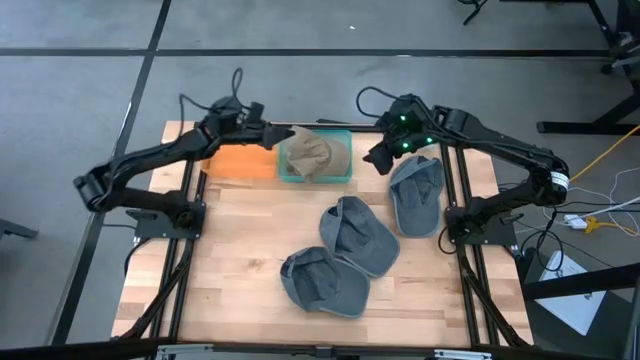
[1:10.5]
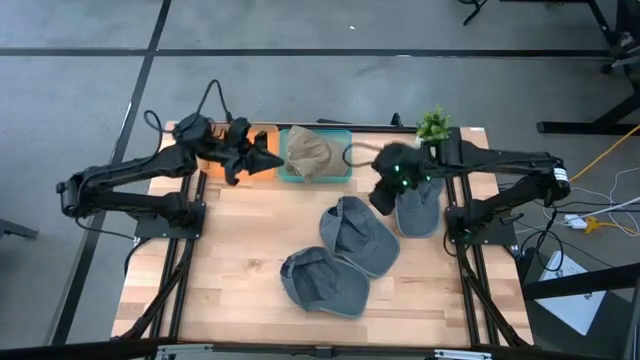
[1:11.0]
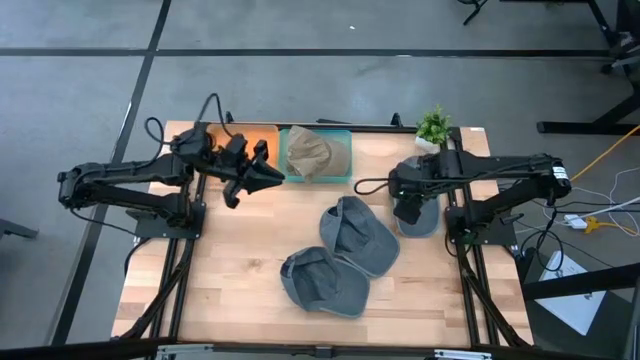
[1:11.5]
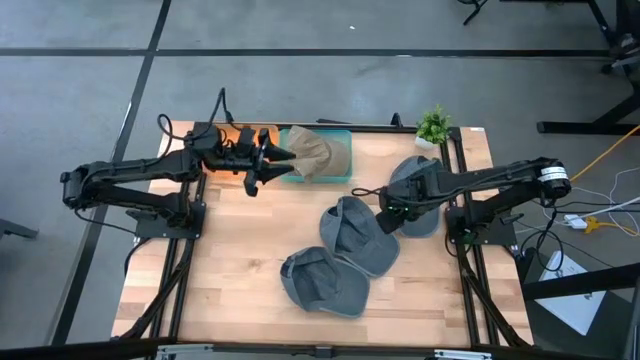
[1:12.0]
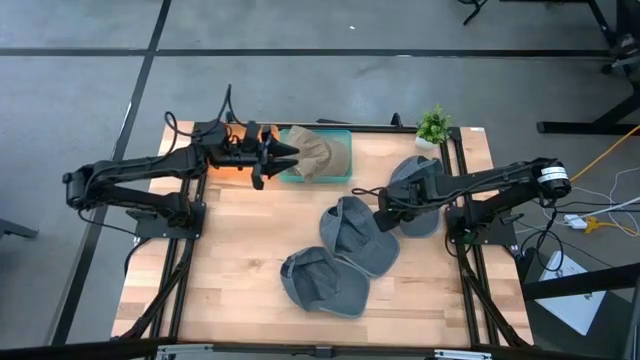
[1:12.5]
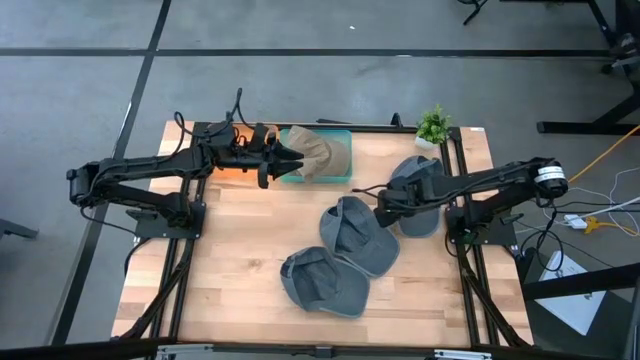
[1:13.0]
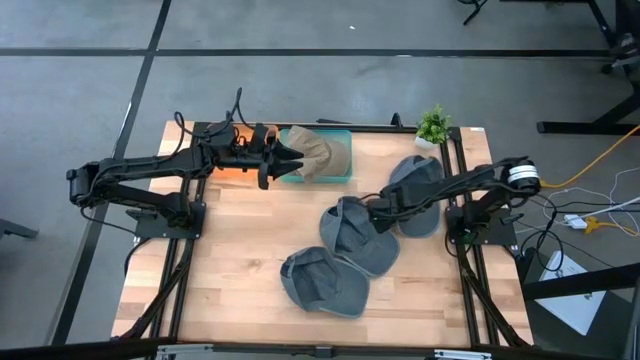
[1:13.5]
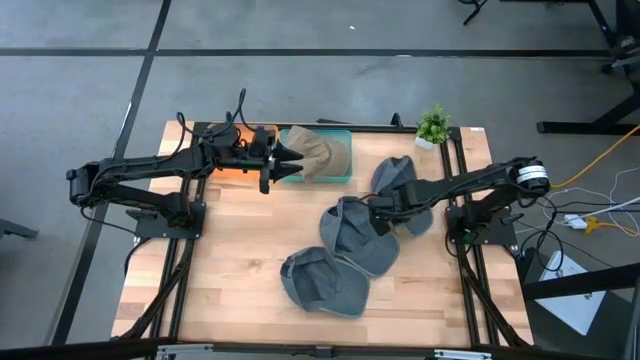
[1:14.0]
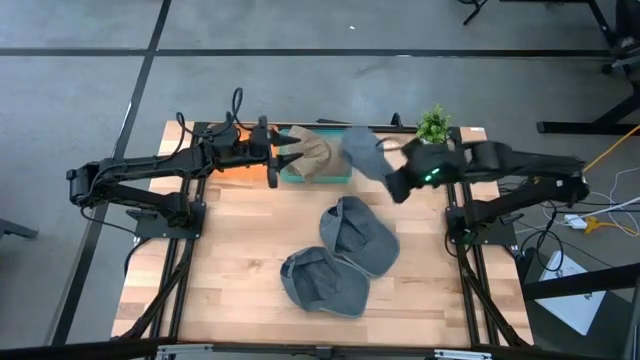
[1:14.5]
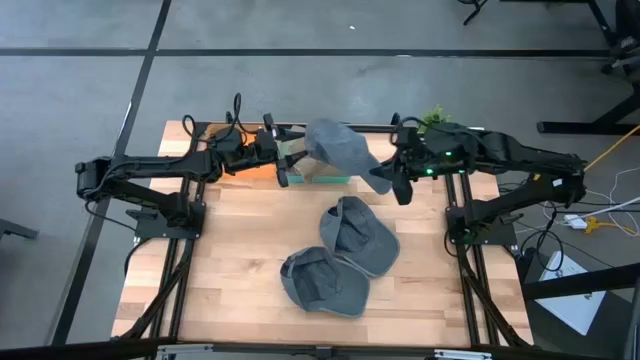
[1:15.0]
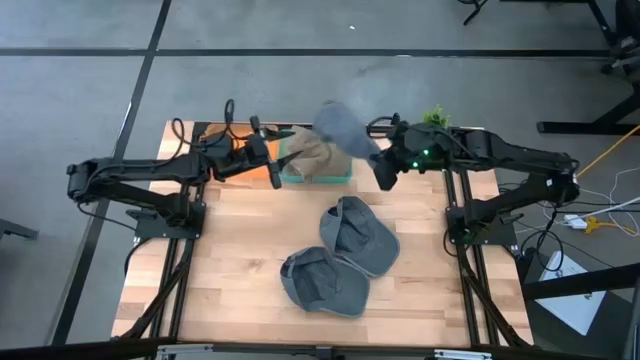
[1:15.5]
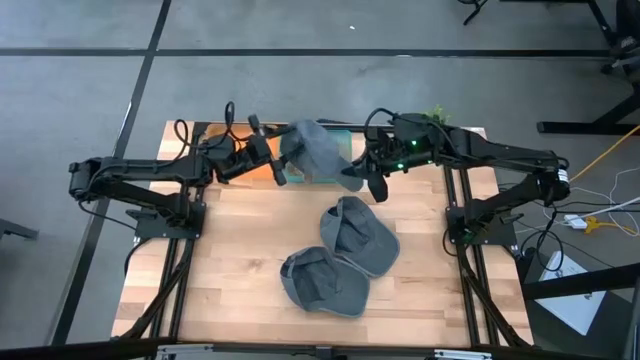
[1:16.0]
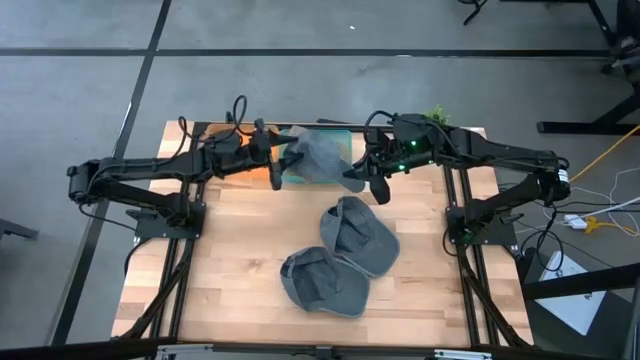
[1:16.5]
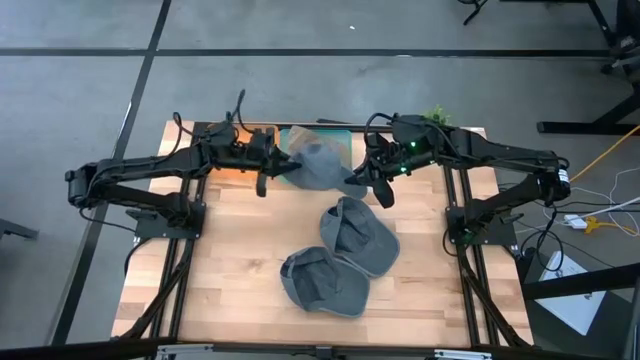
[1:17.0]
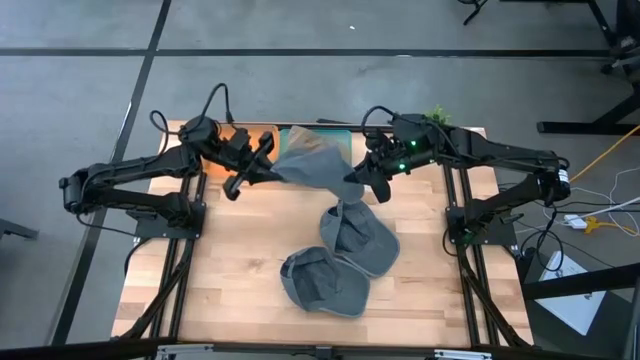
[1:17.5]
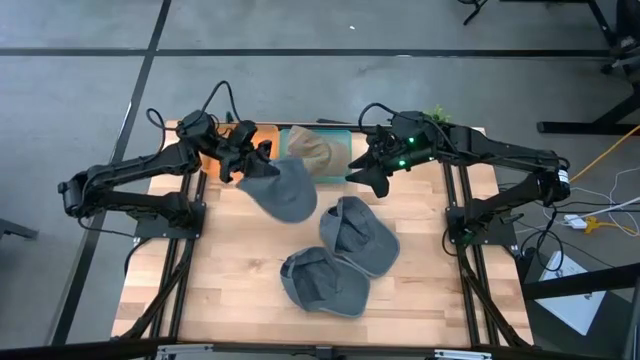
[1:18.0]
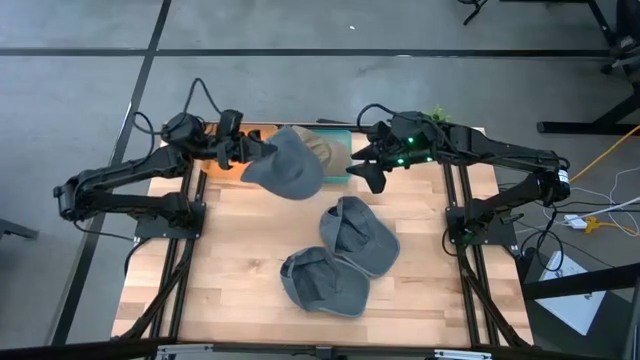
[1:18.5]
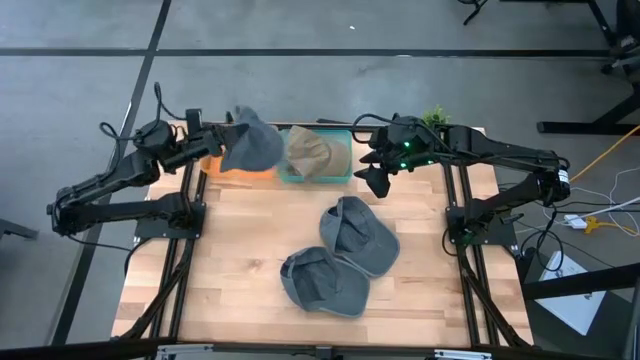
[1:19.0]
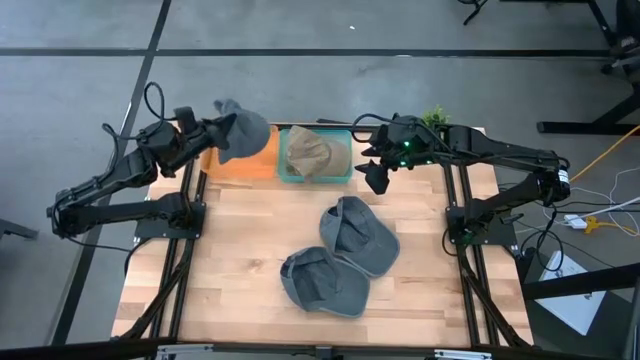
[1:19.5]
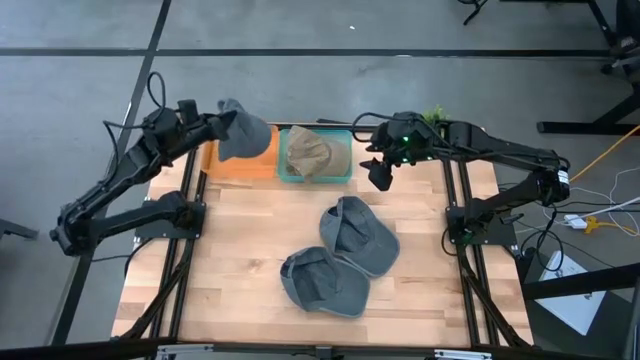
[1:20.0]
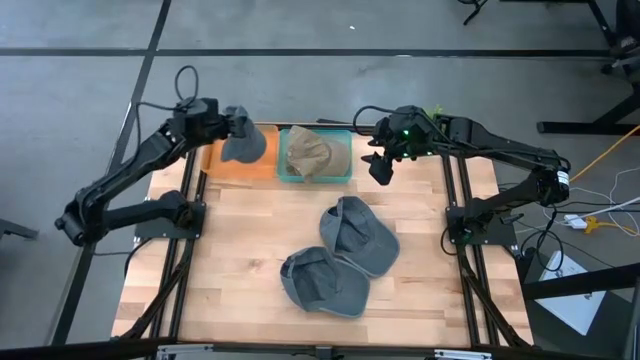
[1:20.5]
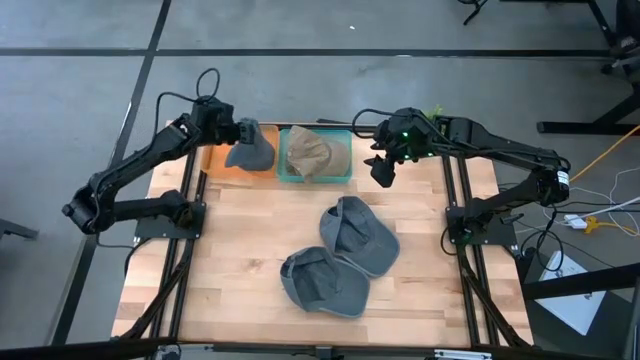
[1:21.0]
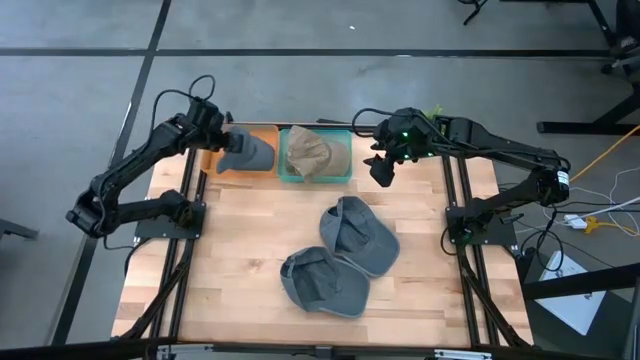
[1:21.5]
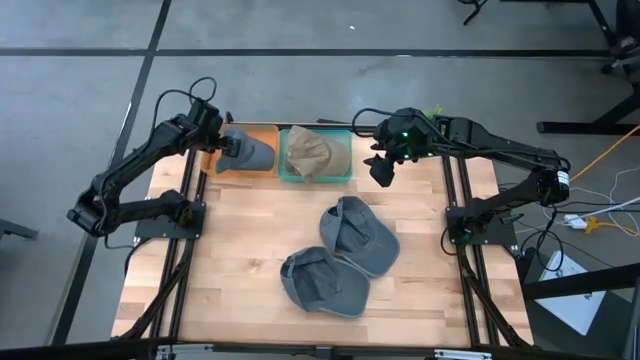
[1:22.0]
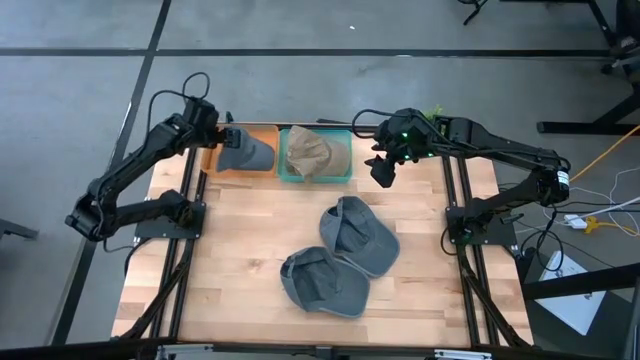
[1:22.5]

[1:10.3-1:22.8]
Task: Pick & Place hat
Put the top gray cap into the orange bin

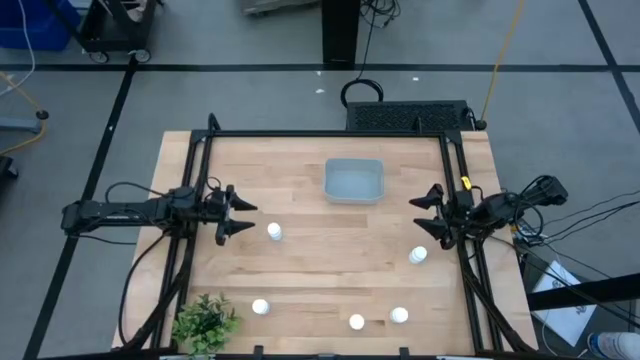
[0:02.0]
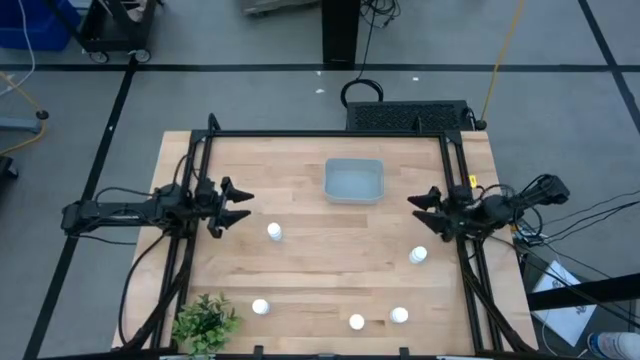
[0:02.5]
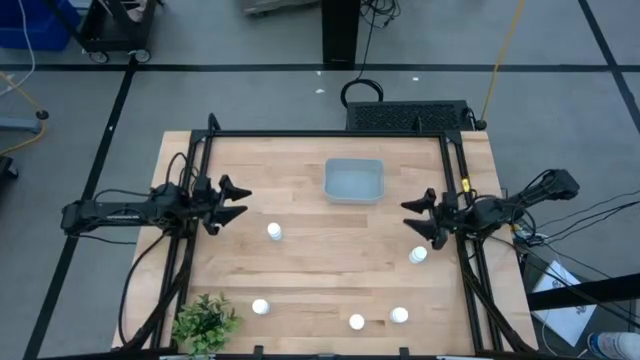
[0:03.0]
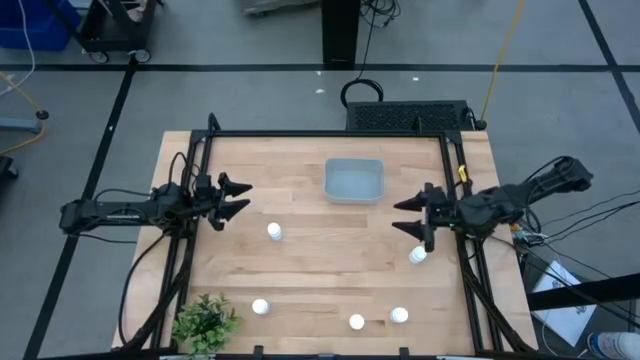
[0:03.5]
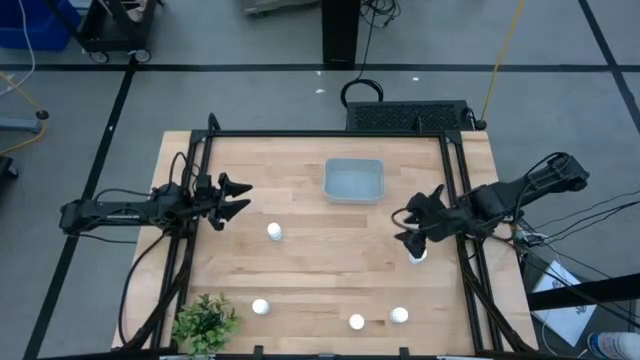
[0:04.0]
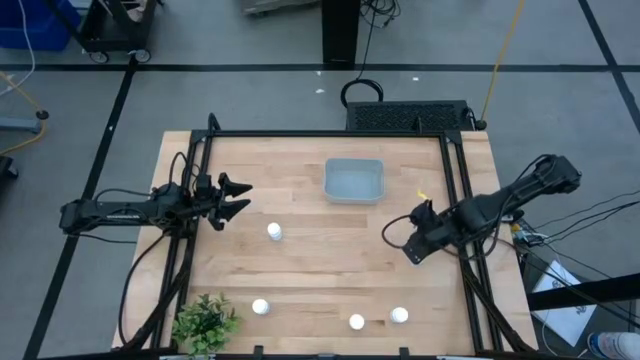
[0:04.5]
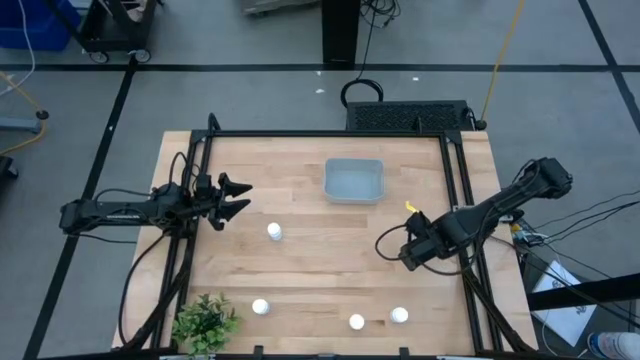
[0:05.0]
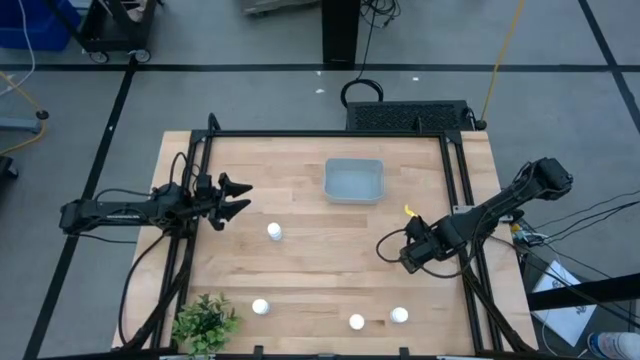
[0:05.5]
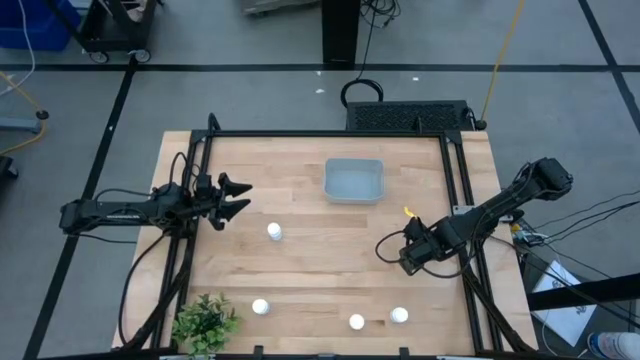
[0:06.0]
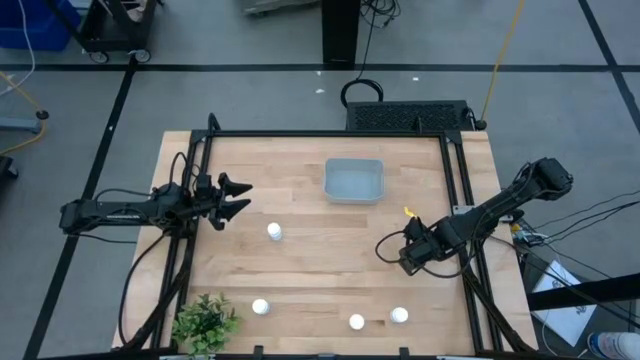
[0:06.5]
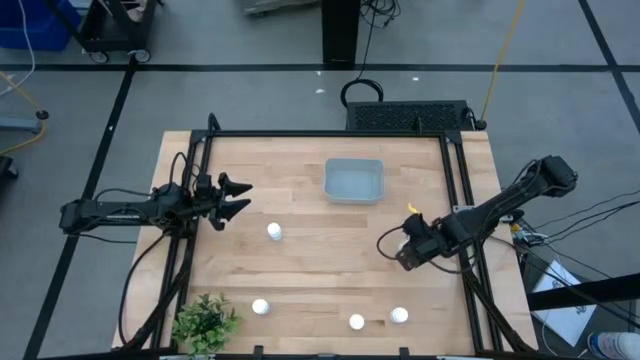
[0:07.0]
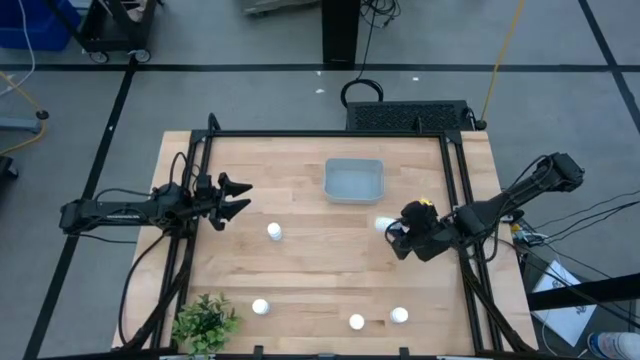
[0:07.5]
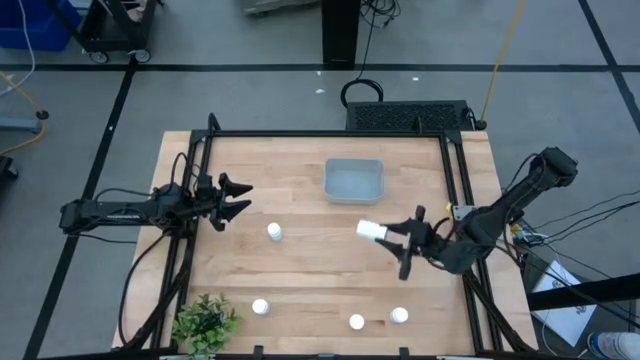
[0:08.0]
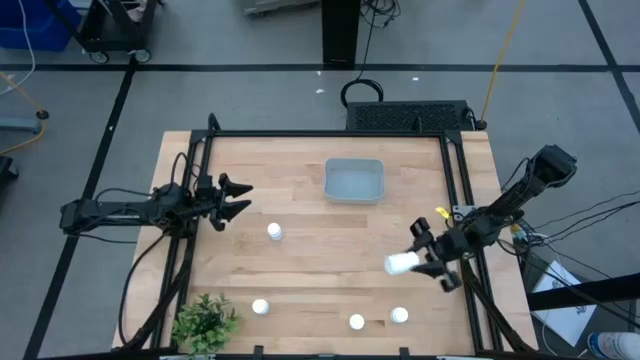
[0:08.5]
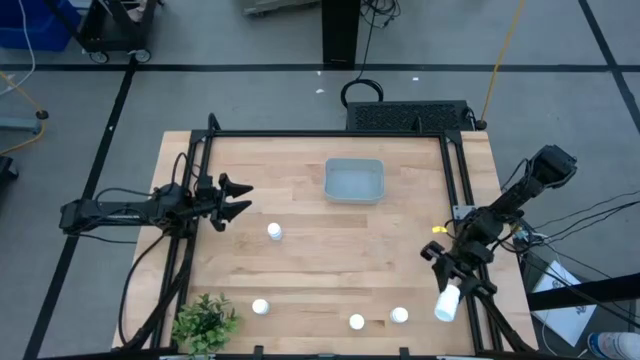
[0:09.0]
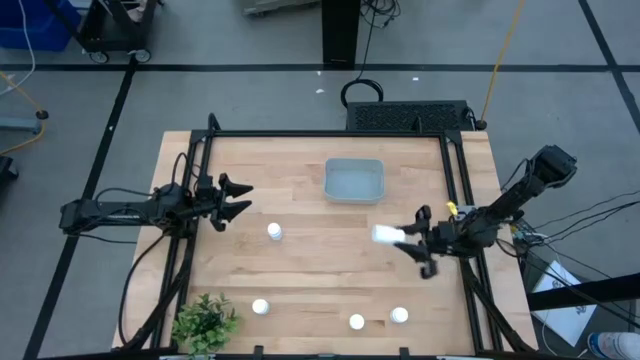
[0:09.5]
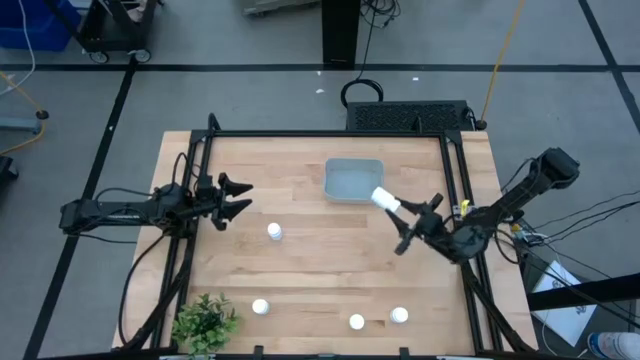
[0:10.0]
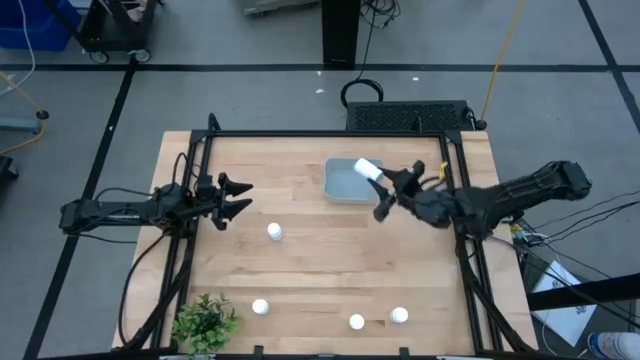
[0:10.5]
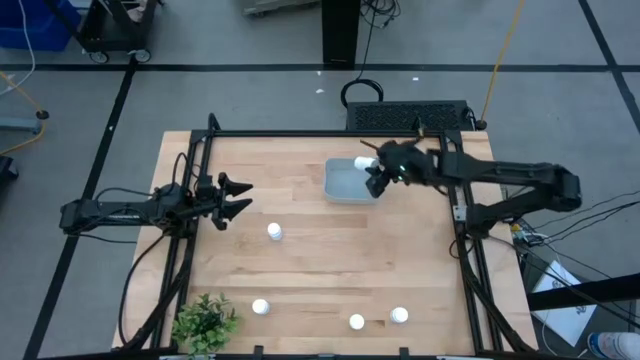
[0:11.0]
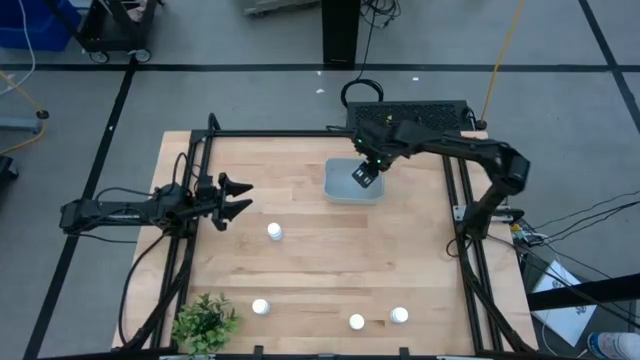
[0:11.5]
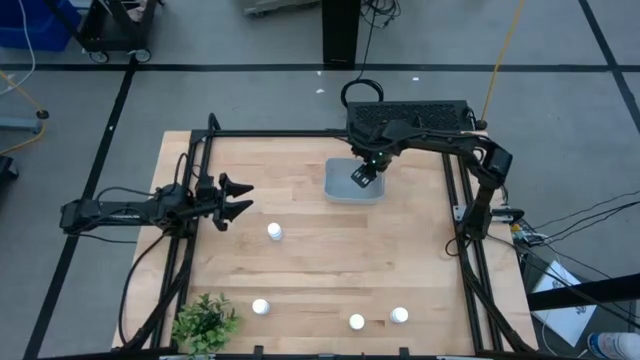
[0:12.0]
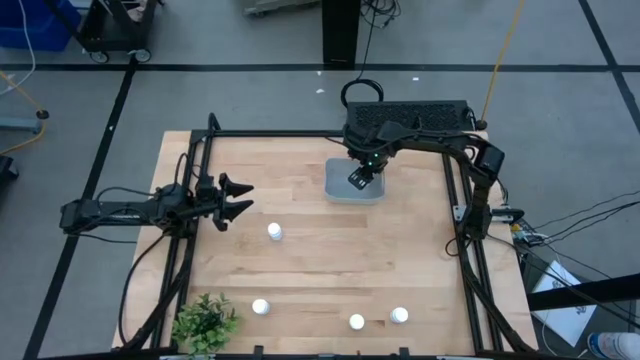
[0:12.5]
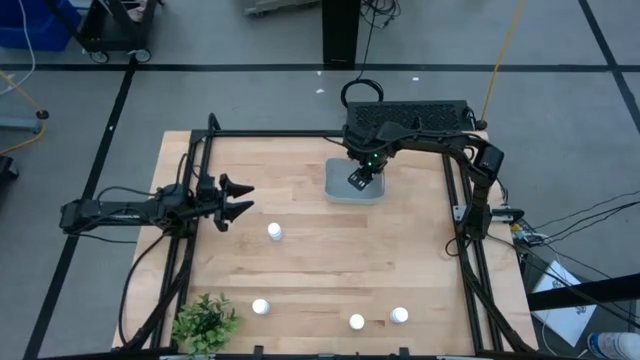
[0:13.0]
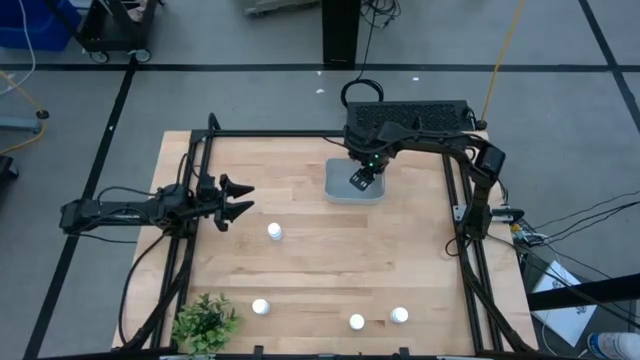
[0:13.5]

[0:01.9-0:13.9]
Task: Pick and place pill bottles into a basket
Put the white medicine bottle into the gray bin
